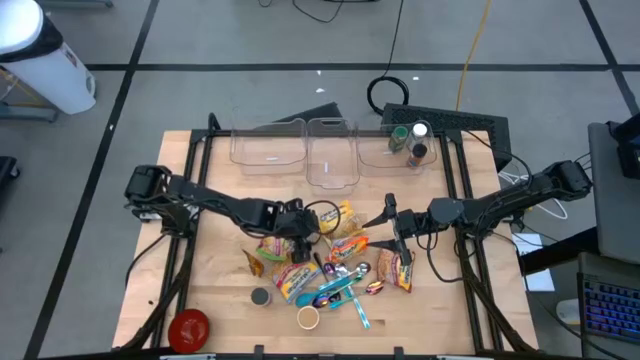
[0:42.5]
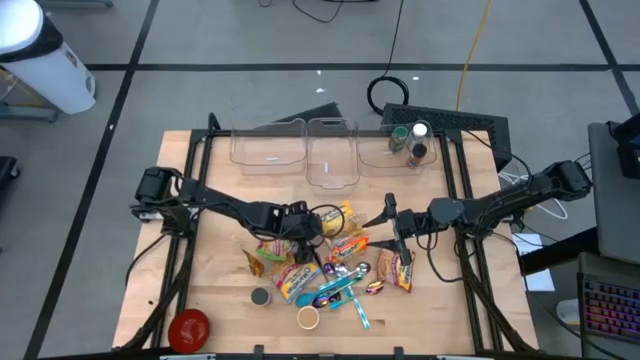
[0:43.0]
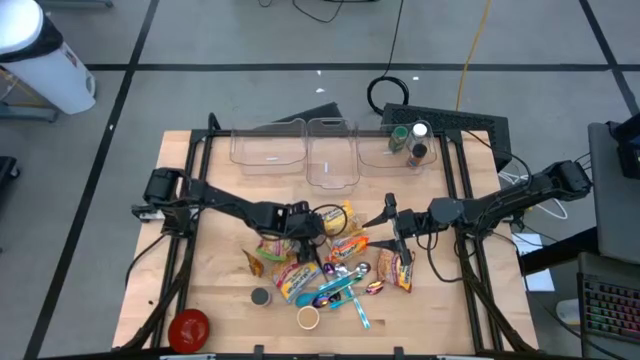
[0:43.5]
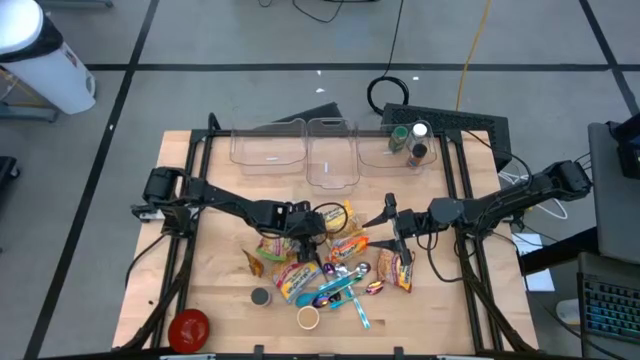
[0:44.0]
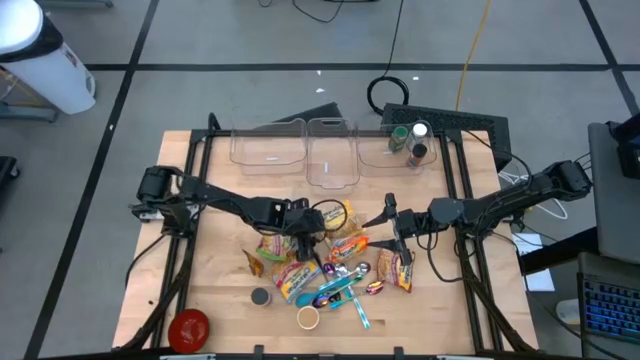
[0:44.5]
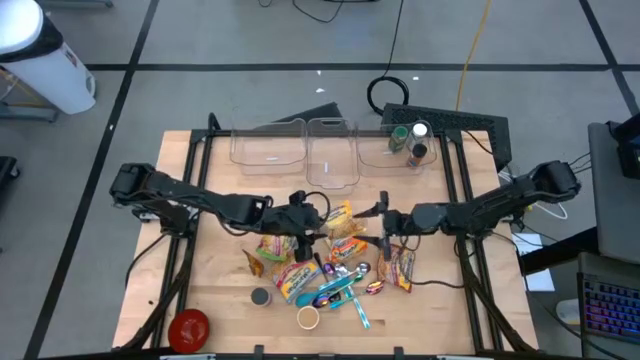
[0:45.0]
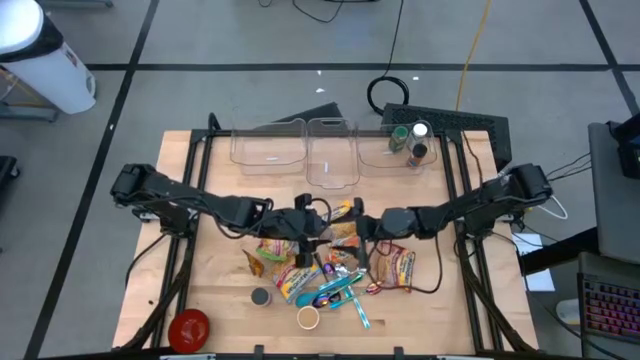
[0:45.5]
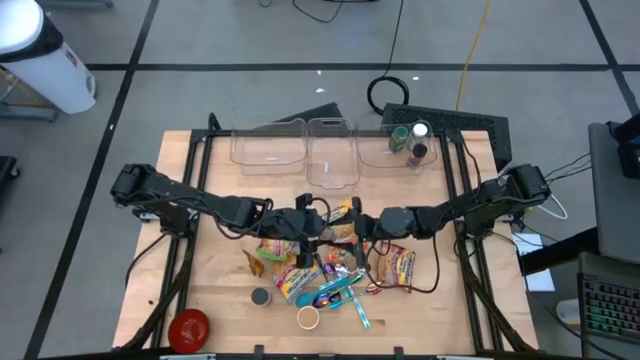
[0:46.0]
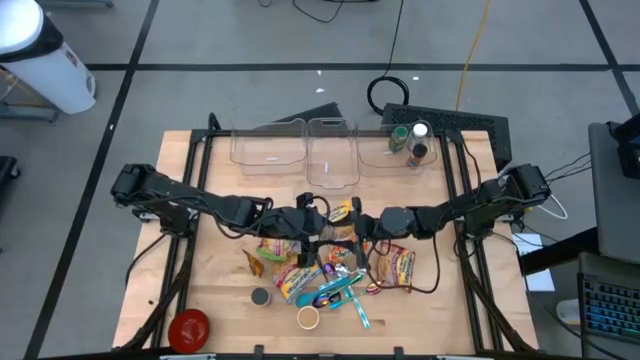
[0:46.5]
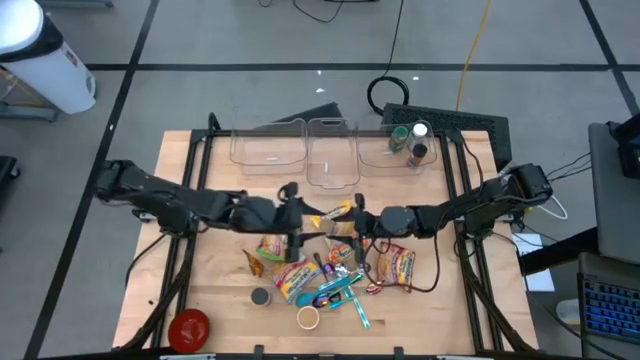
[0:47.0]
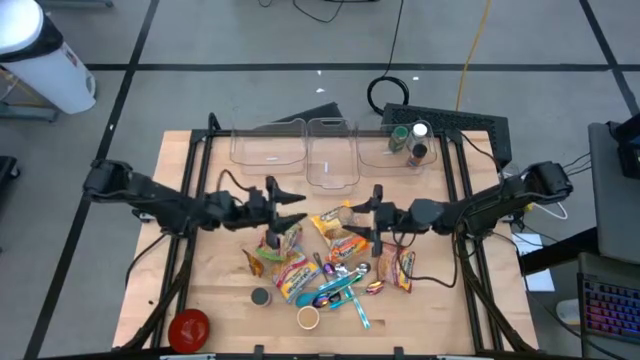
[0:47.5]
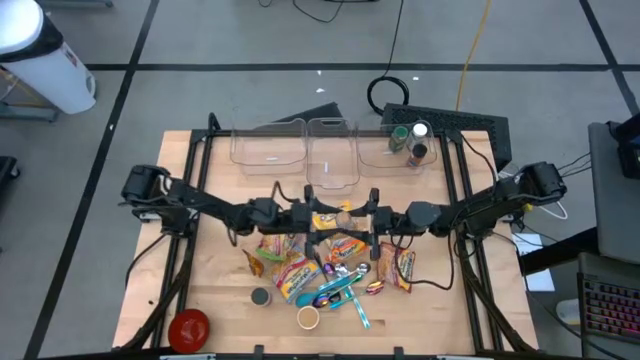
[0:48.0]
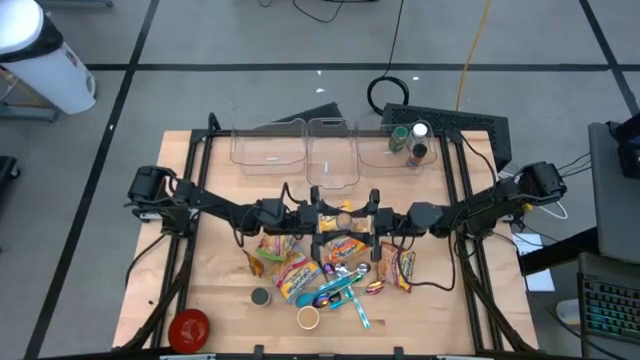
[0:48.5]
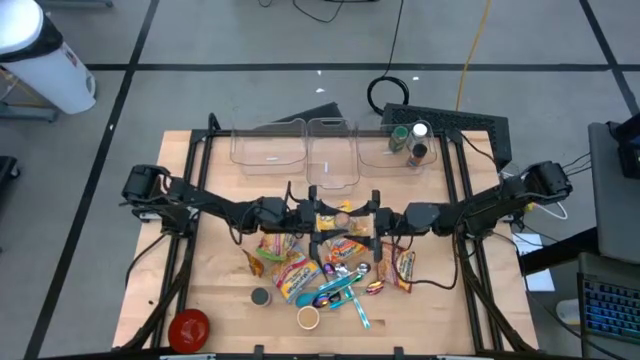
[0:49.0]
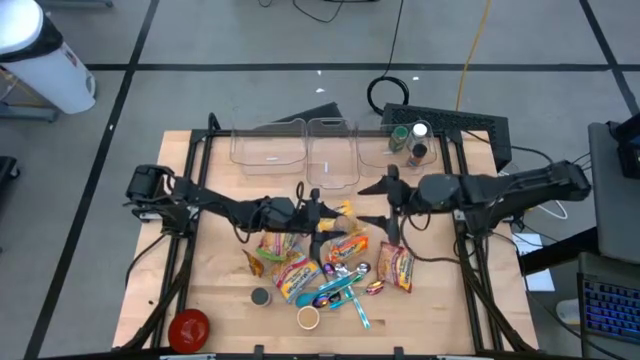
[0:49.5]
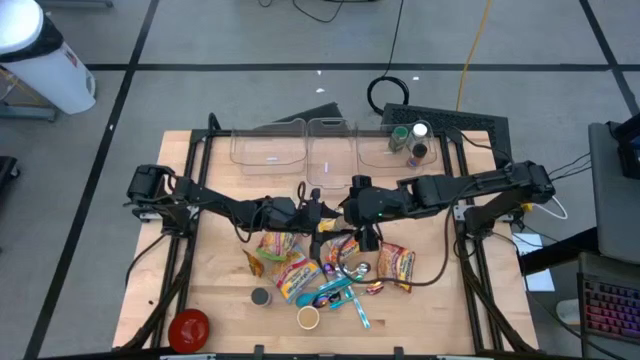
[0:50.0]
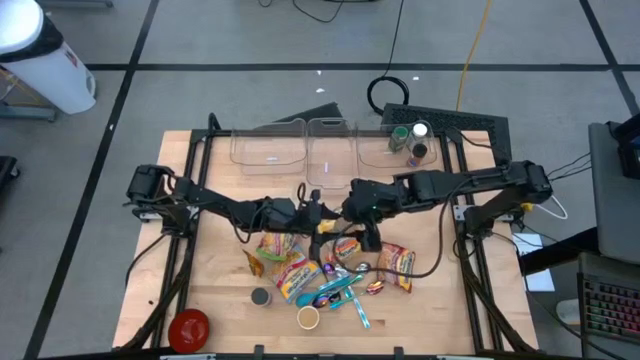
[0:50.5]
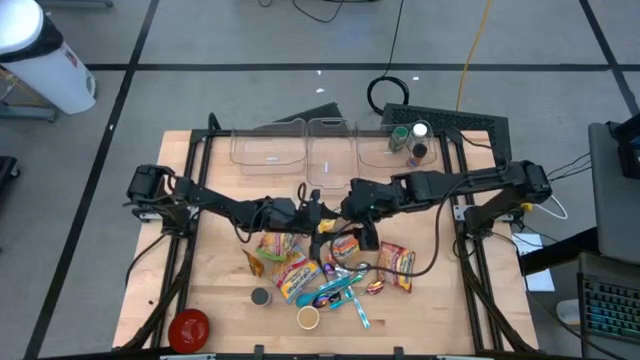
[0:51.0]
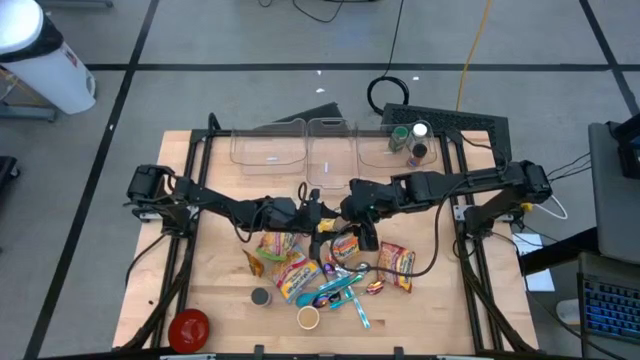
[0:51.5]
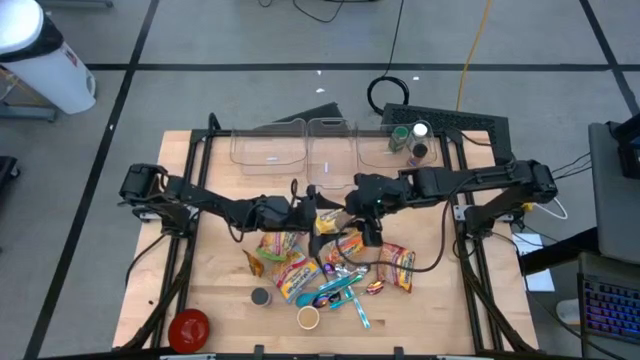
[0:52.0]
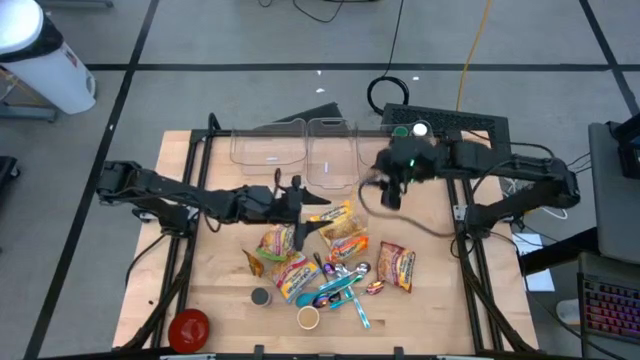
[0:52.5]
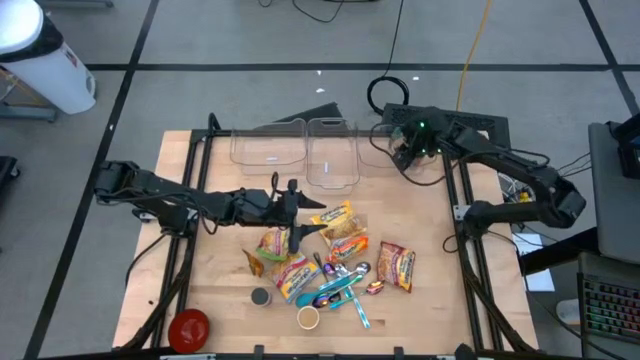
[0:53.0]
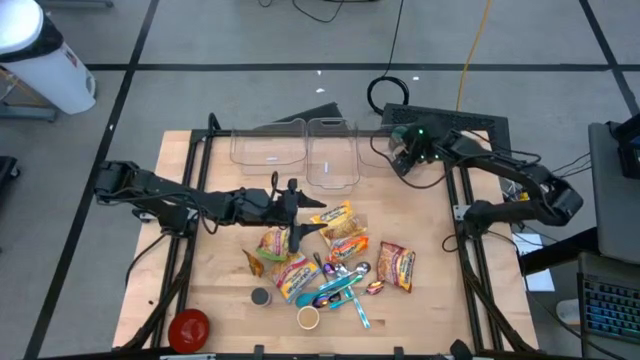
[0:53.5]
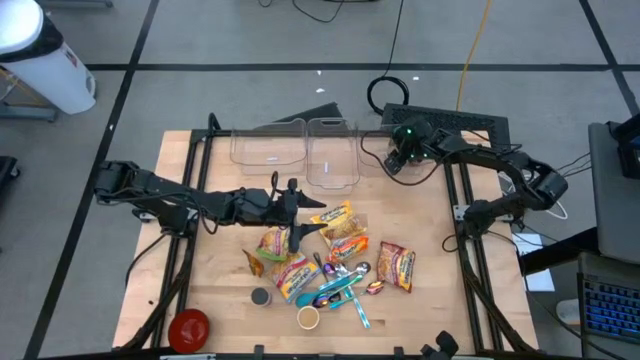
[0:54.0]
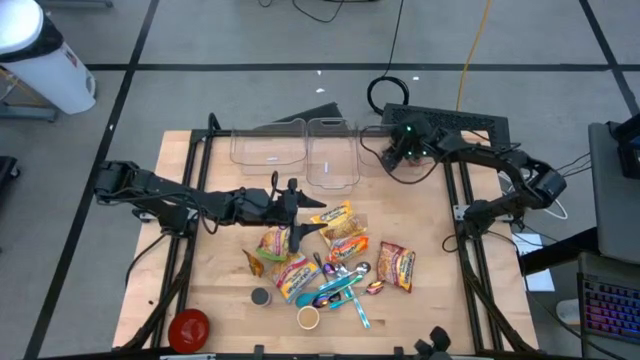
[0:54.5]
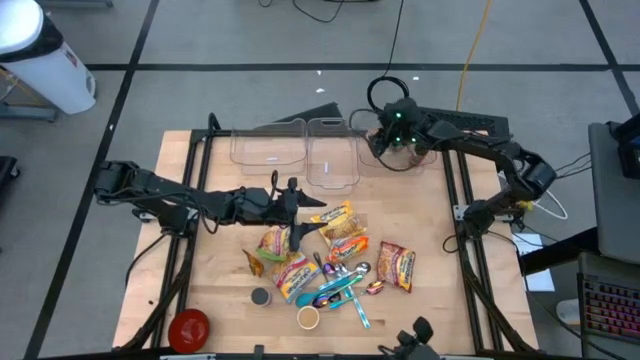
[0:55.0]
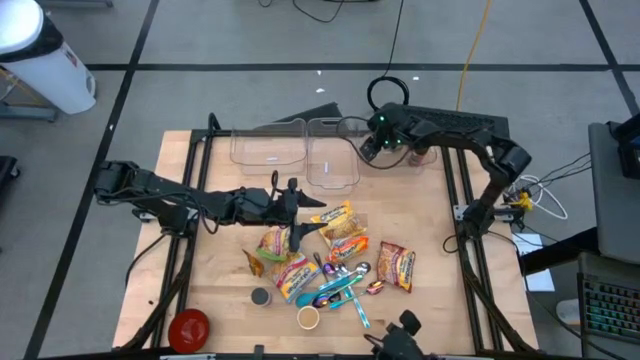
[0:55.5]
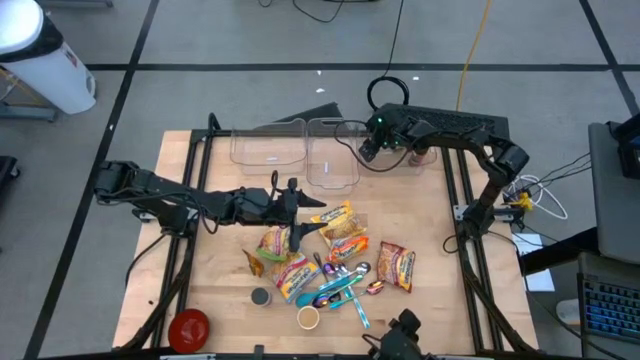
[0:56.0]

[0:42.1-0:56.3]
Task: Pick & Place Food Item
Put the brown seasoning bottle into the right transparent bin

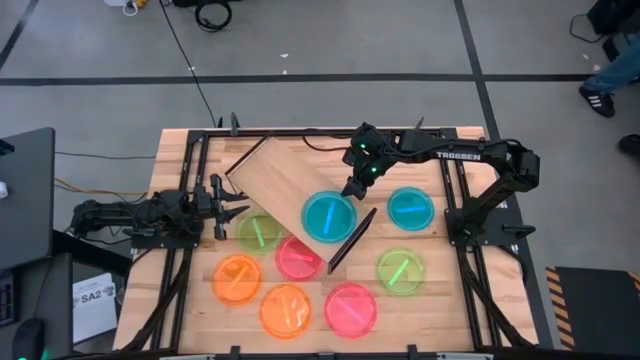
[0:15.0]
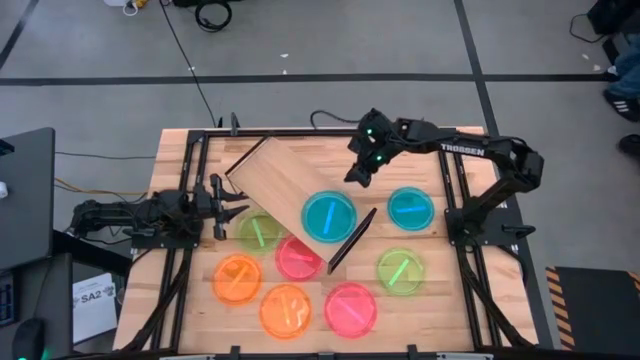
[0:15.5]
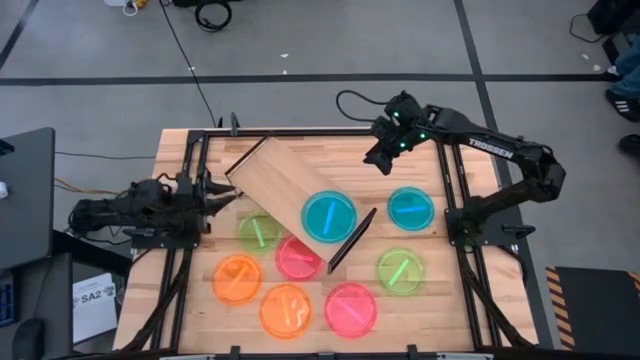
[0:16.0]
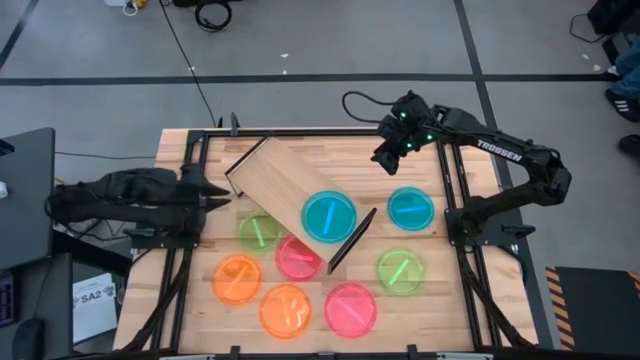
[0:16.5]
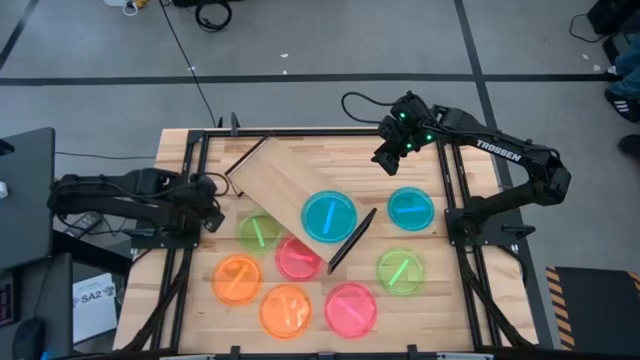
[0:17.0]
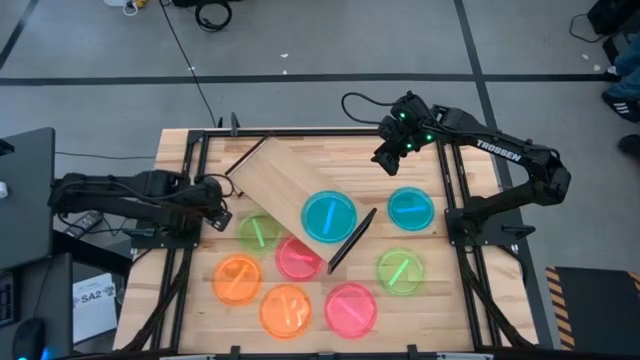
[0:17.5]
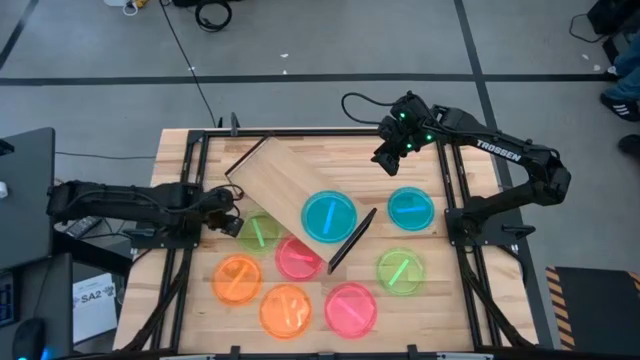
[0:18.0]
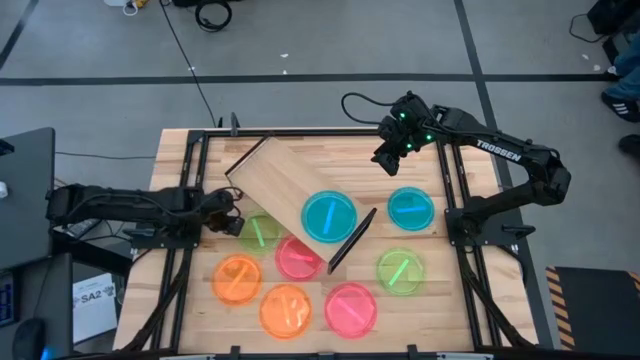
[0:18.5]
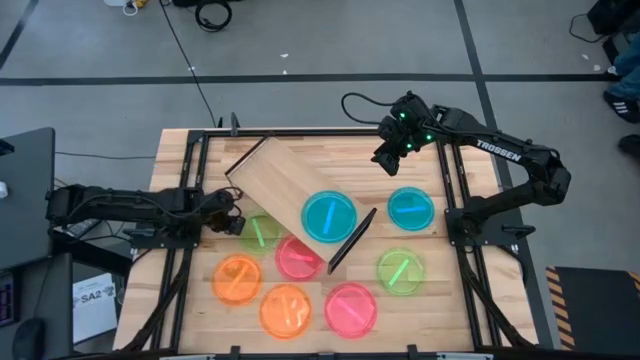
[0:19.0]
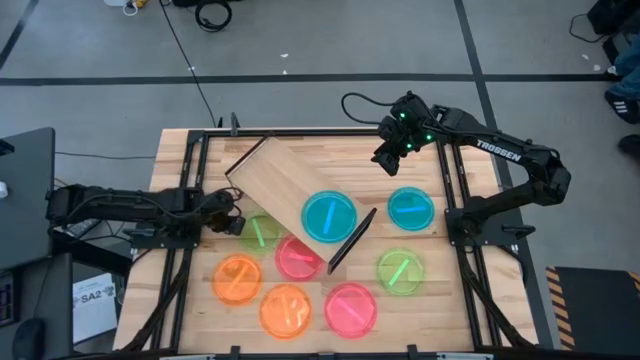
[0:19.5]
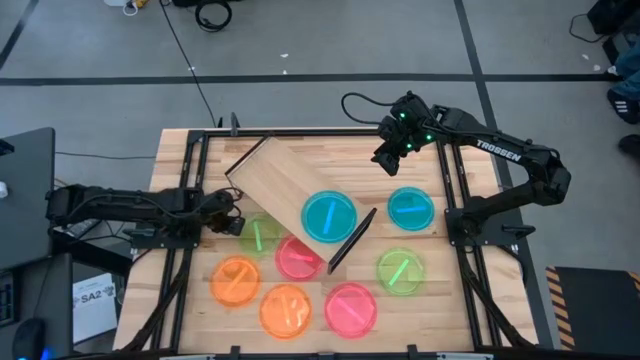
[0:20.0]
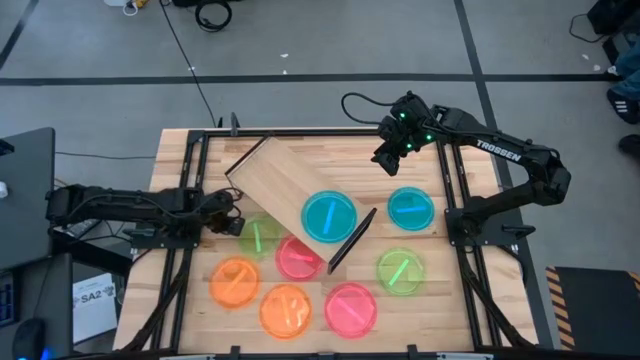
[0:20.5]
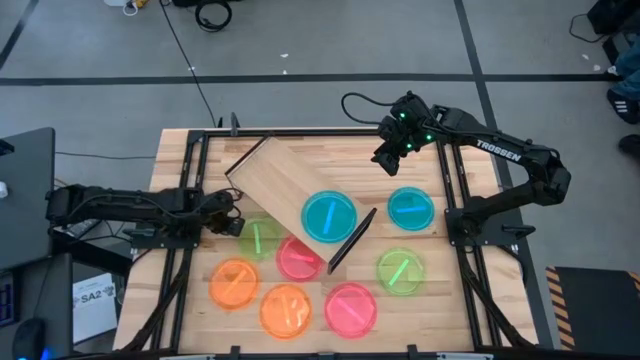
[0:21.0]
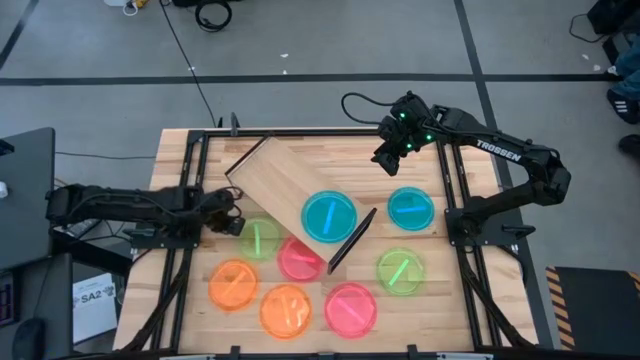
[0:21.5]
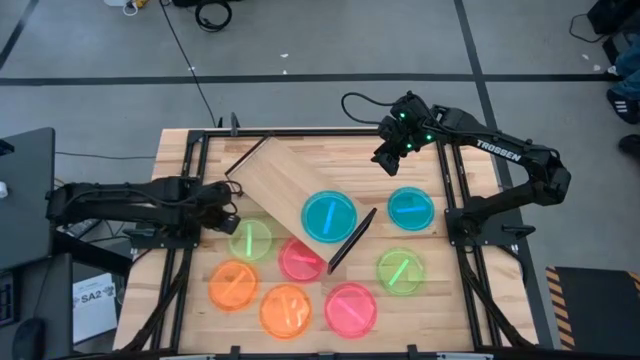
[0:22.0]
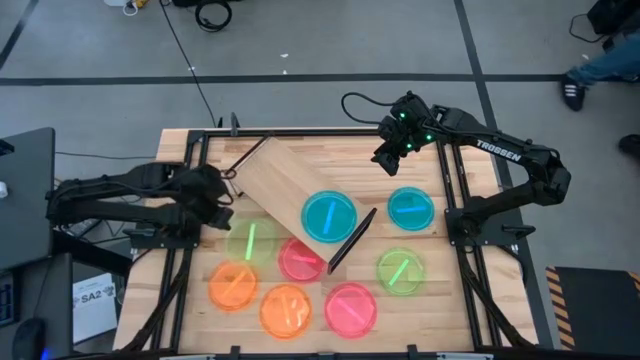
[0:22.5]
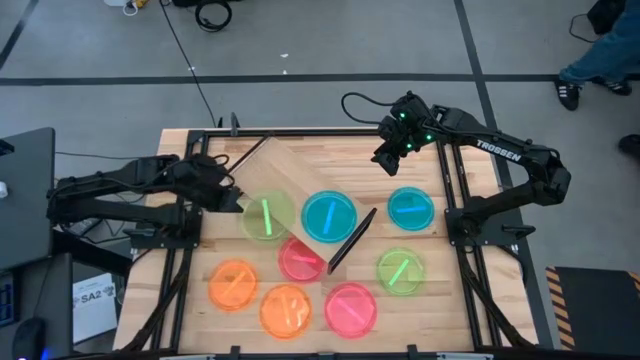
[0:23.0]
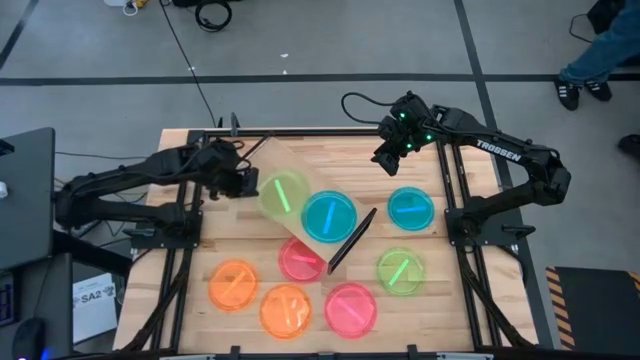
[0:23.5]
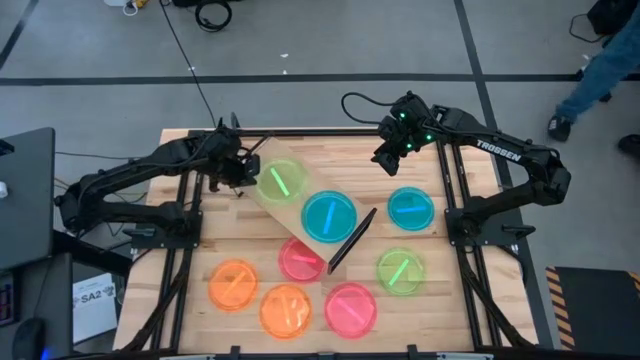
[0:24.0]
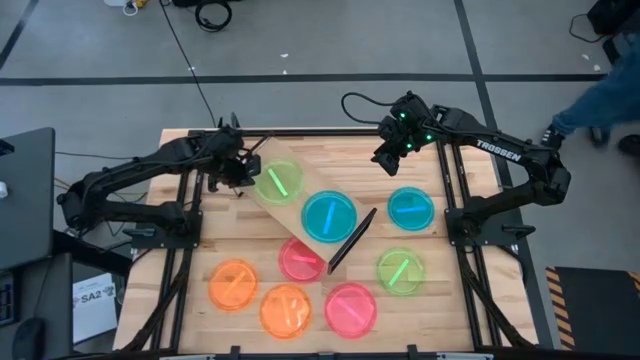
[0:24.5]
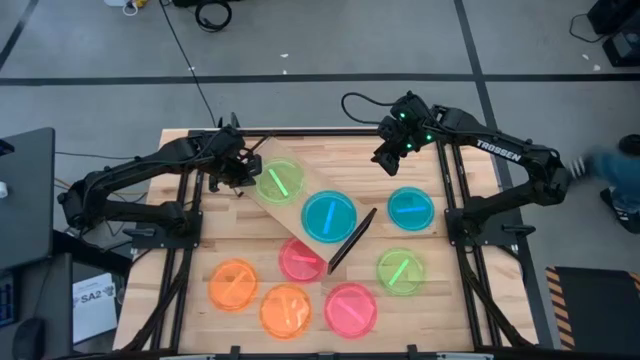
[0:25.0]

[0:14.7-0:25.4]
Task: Place and stack plates onto a shelf
Put the top green plate on the shelf
